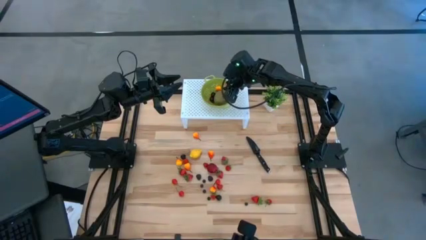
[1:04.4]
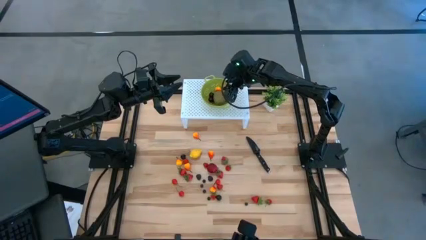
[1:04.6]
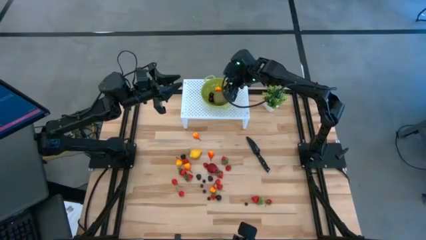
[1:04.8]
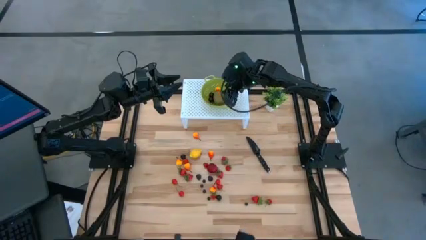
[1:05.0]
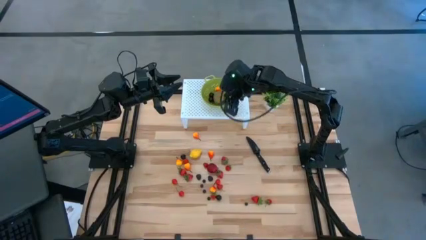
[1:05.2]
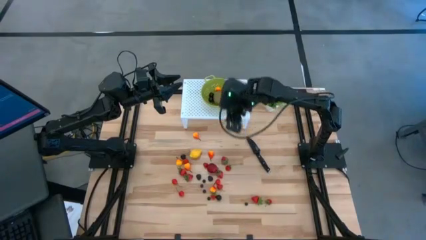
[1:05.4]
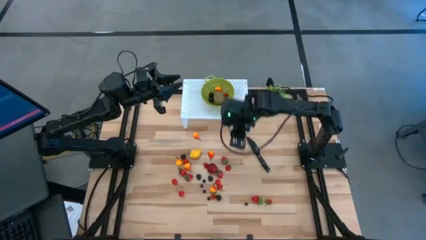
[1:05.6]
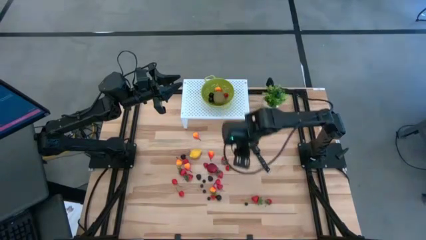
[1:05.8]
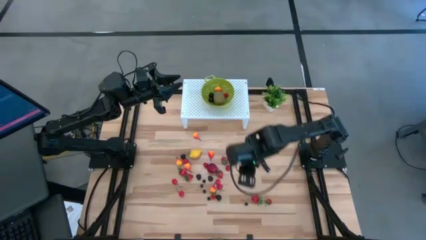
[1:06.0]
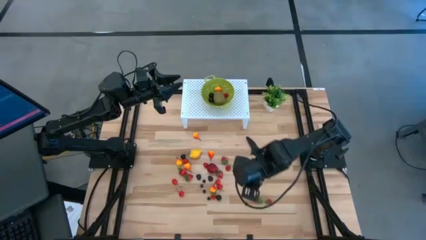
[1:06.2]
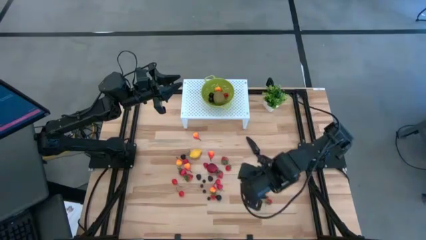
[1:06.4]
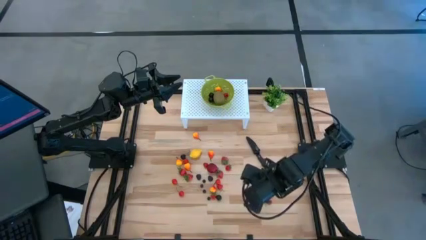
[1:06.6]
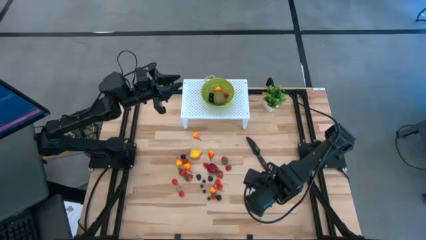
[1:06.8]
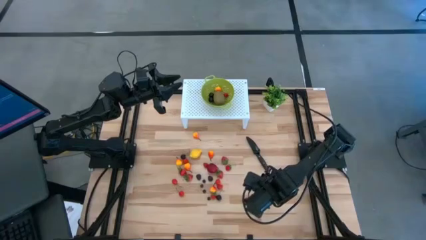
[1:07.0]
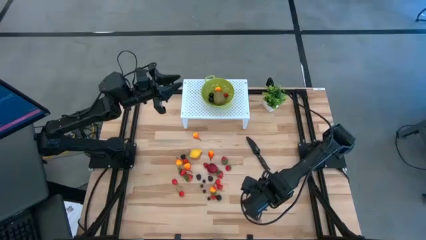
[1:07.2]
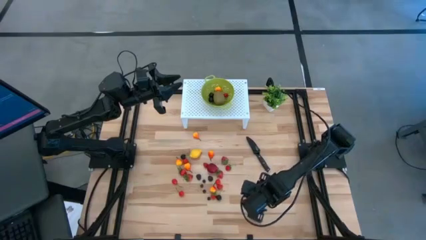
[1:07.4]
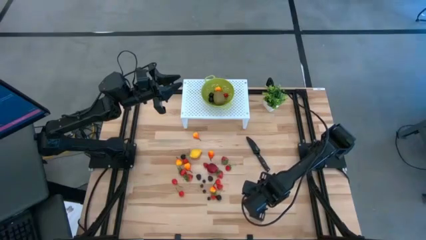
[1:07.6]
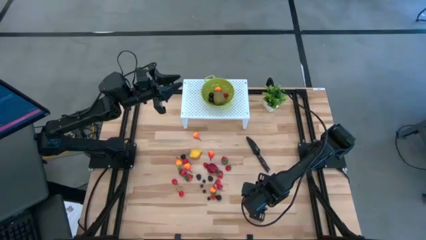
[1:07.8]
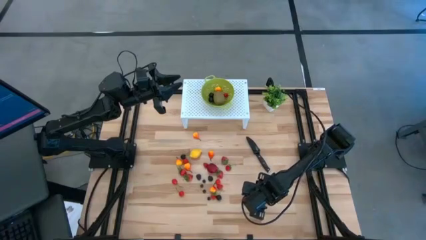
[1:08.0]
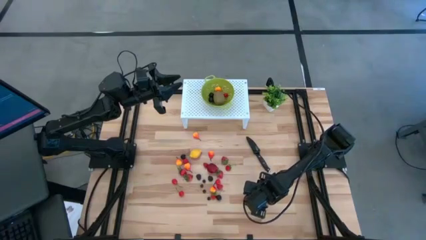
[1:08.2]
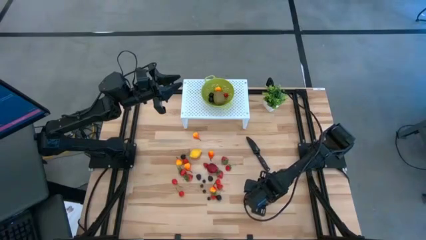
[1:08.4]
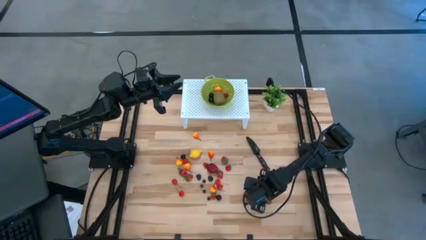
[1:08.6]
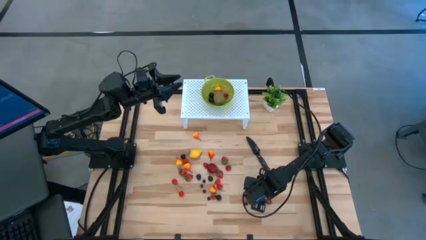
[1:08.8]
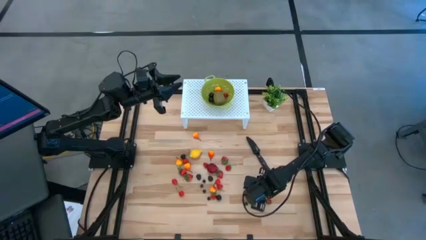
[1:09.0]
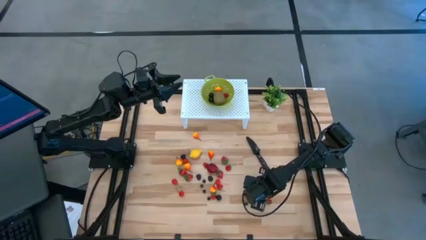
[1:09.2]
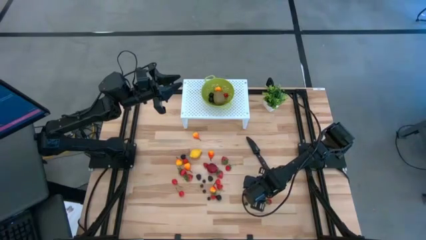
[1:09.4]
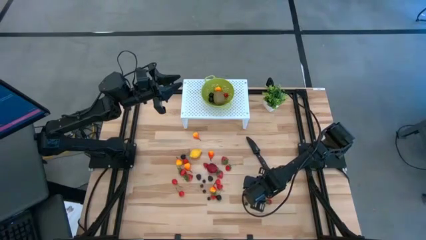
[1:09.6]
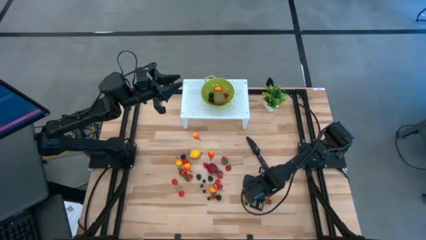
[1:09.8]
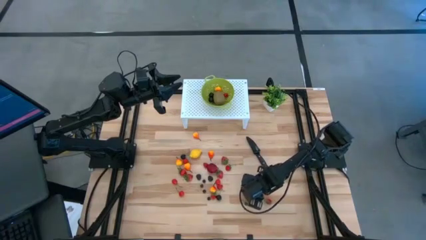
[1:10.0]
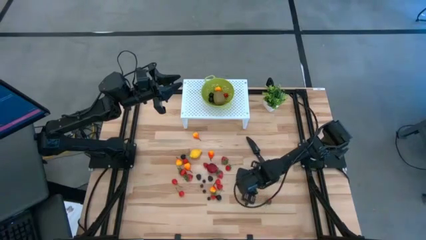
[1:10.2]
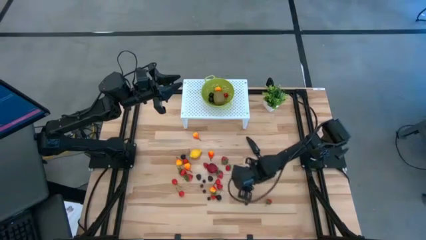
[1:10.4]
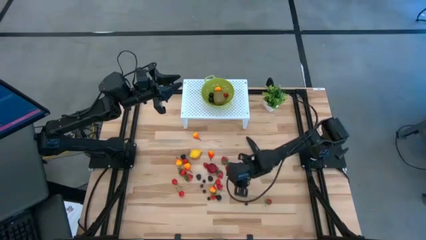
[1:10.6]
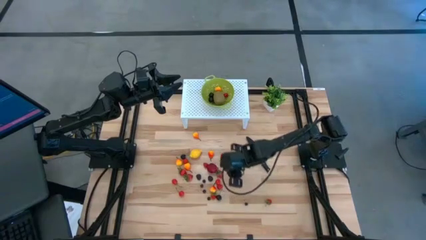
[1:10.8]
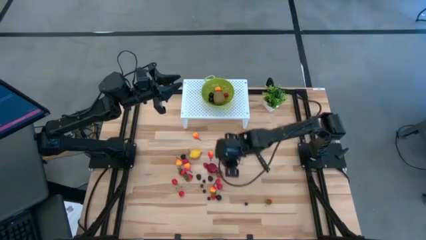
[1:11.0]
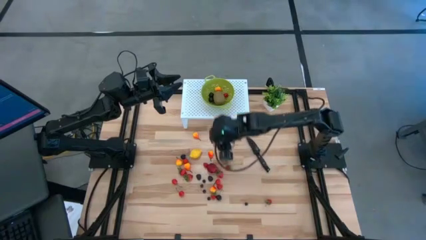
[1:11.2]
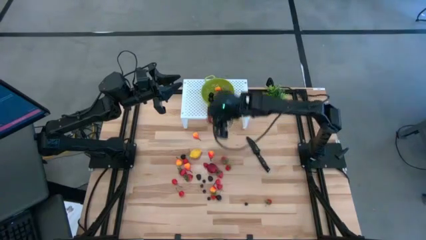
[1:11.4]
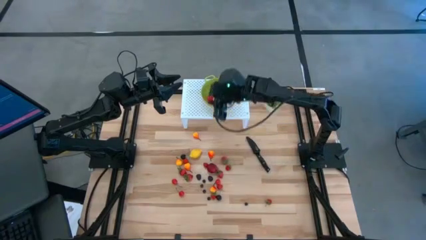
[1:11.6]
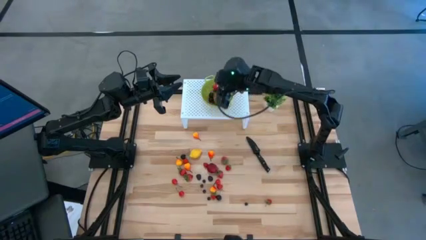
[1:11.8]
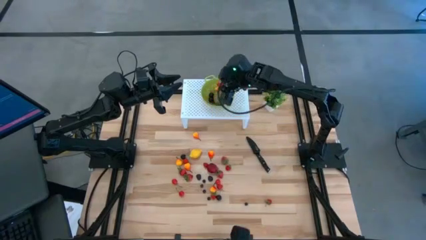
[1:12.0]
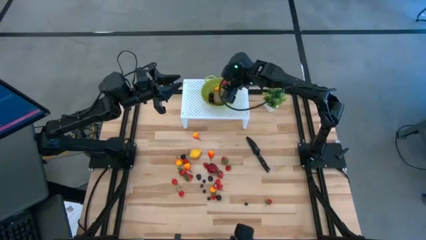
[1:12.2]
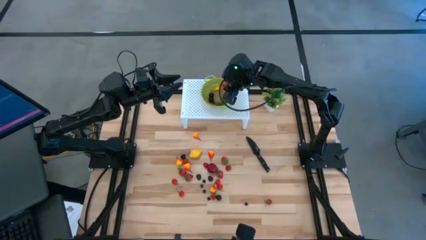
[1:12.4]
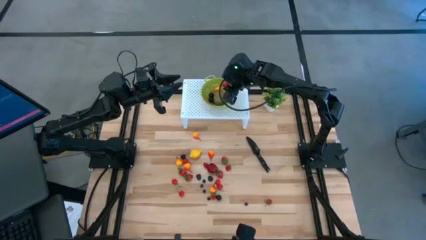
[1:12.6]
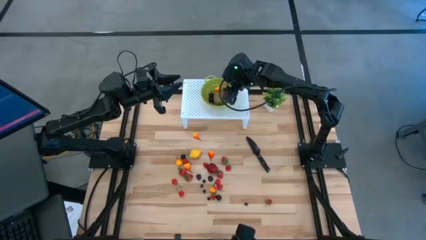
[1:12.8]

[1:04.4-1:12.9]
Task: Pick & Place Fruit
Put the red strawberry into the green strainer bowl

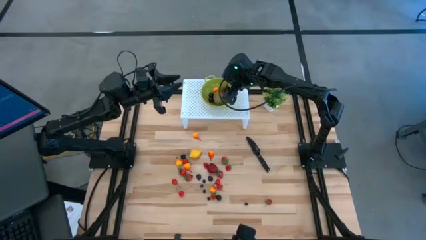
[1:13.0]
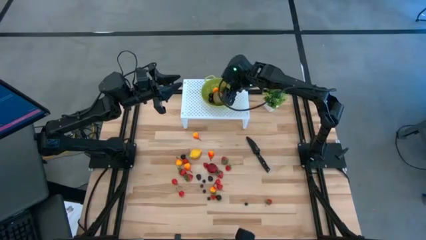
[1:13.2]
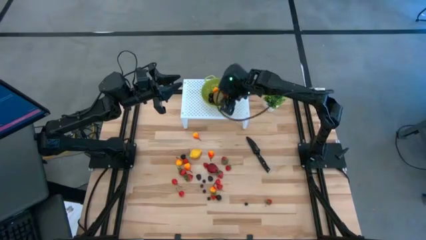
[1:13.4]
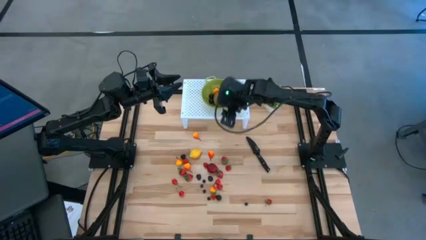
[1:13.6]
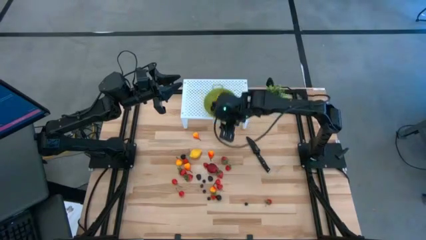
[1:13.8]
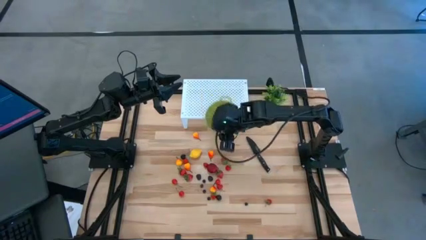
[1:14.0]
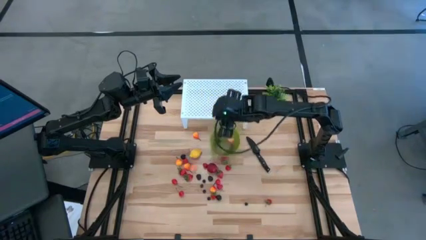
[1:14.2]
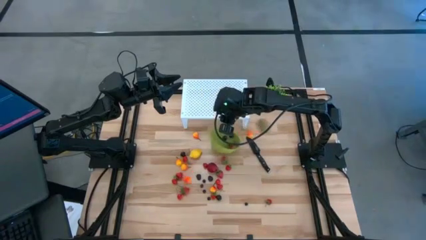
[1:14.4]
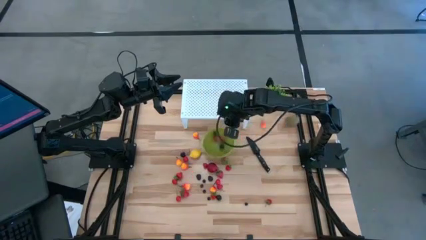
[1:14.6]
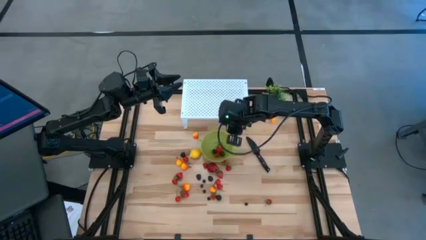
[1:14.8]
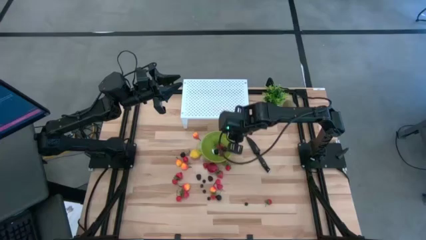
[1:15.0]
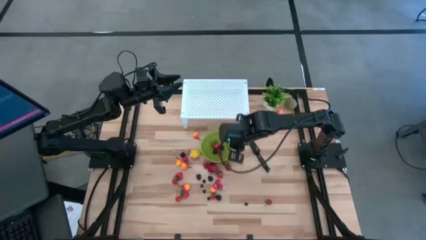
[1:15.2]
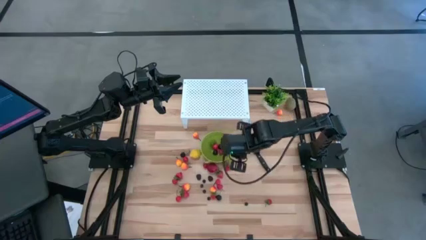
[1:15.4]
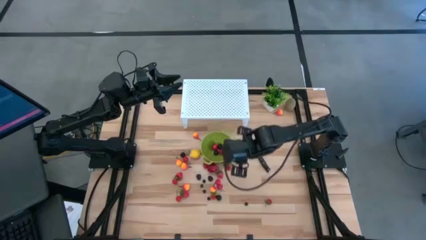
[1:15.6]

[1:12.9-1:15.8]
Adjust the green strainer bowl on the shelf

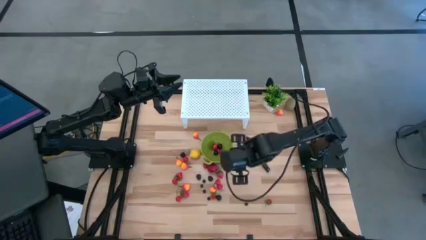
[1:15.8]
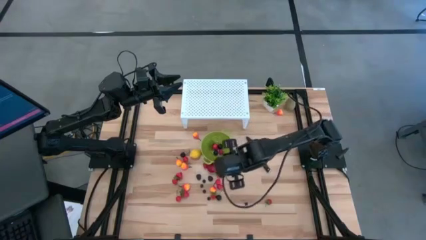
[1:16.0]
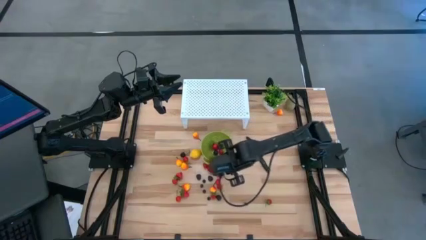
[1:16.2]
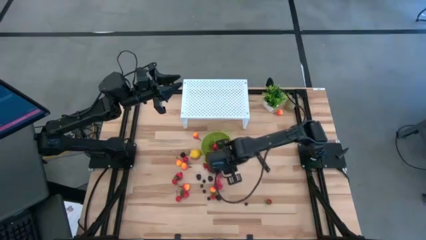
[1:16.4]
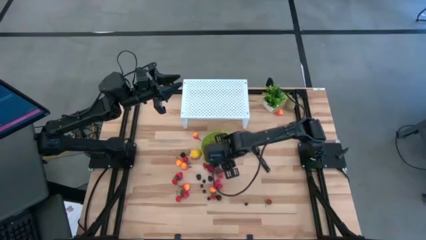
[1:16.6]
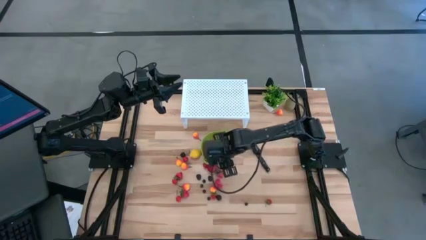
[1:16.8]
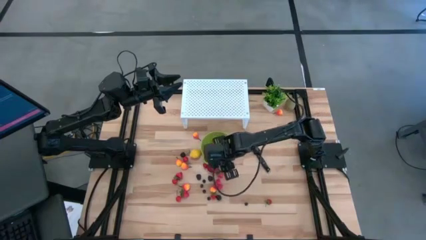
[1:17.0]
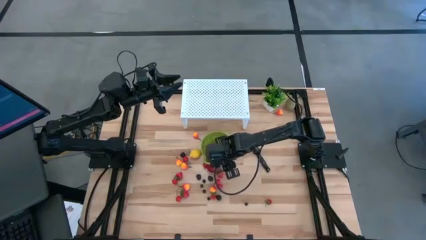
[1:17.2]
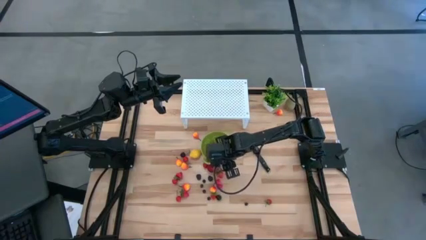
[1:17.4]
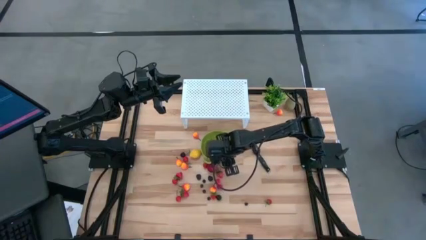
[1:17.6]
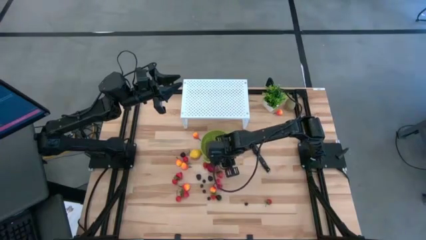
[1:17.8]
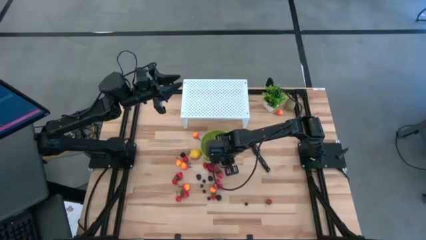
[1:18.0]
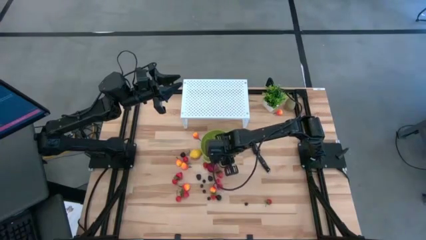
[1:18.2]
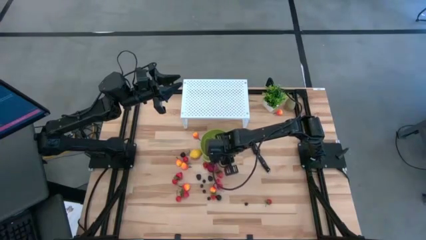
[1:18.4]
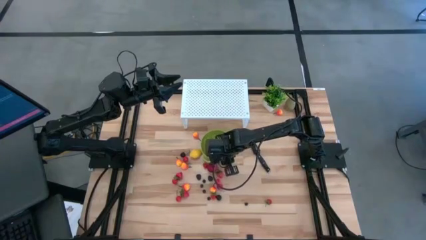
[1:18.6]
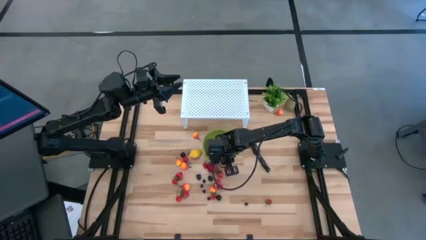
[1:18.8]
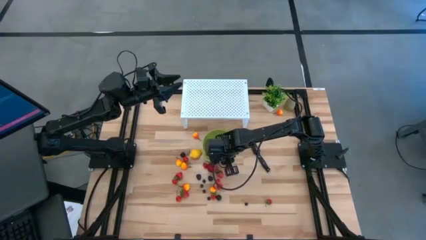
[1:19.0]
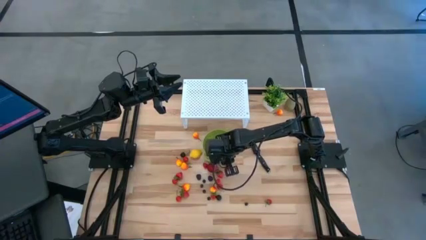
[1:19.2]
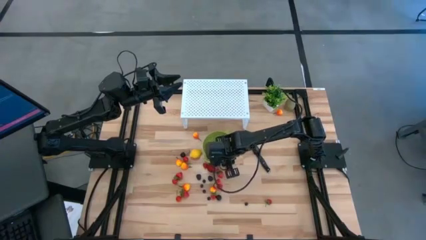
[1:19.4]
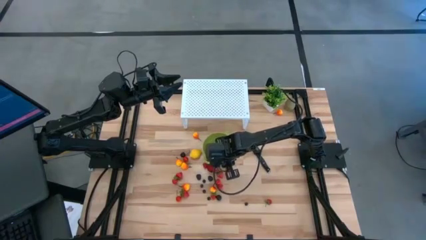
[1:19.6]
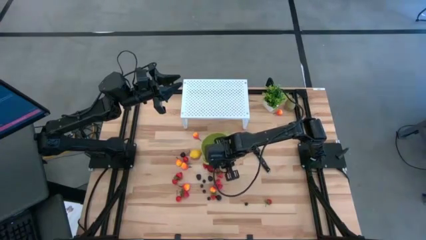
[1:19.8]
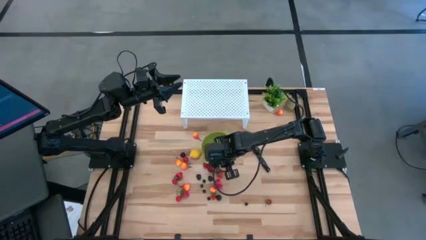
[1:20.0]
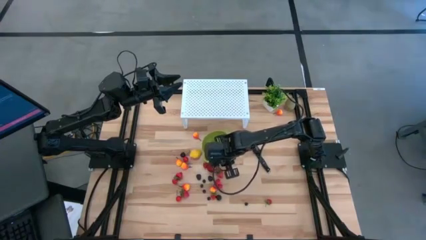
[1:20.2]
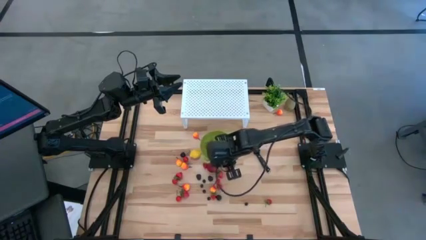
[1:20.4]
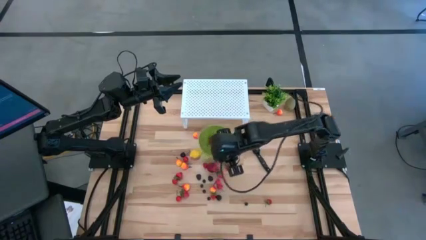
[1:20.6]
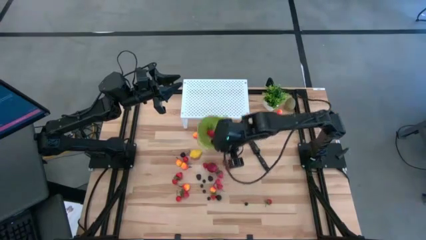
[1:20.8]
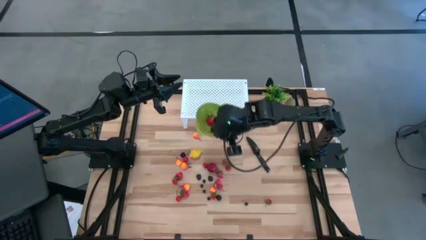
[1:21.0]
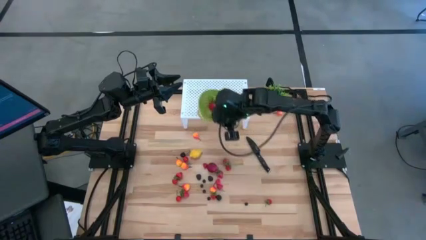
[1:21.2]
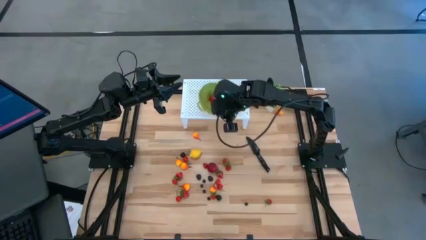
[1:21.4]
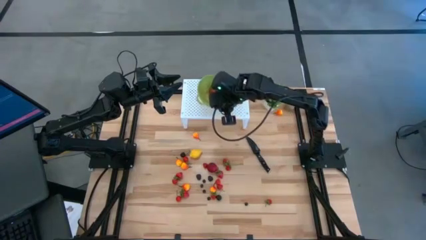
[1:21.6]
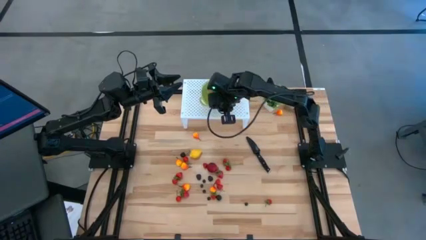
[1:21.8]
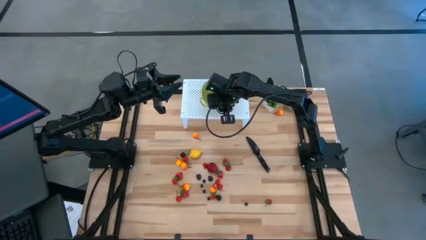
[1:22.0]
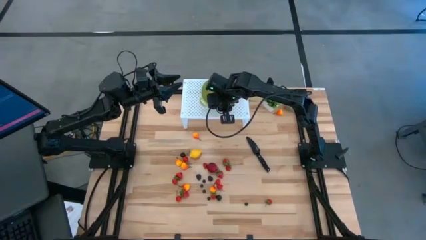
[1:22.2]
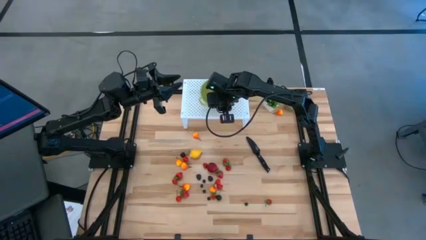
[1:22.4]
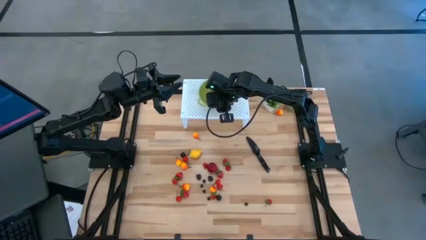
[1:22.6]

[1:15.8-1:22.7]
Put the green strainer bowl on the shelf
